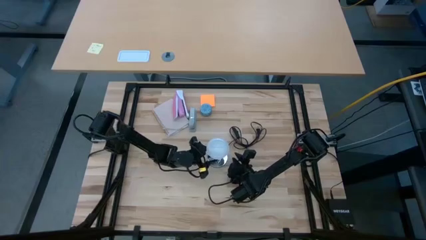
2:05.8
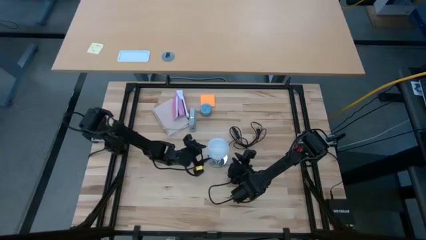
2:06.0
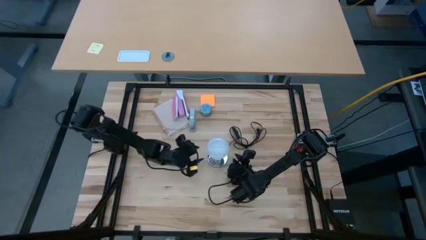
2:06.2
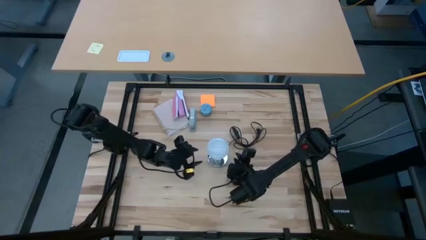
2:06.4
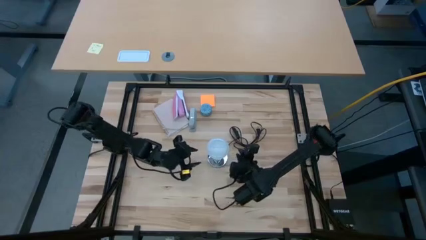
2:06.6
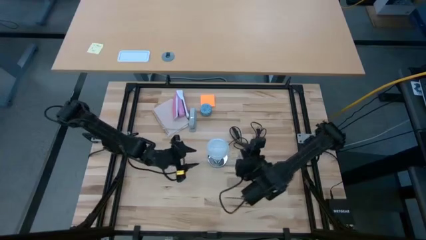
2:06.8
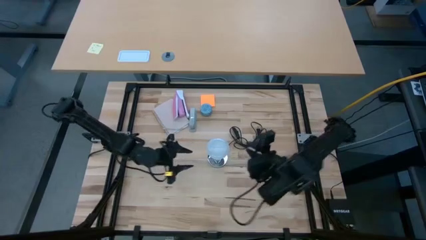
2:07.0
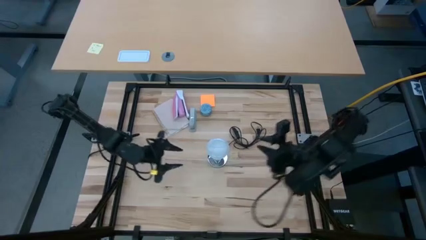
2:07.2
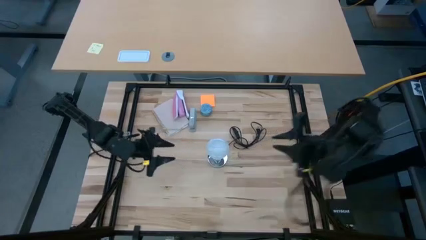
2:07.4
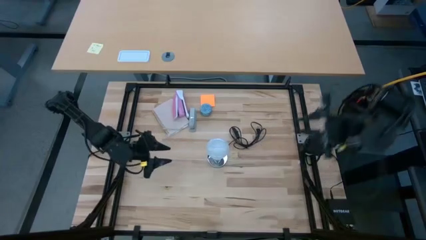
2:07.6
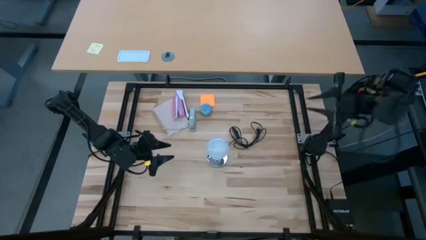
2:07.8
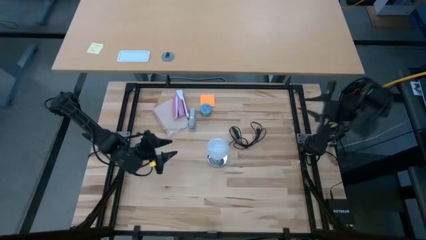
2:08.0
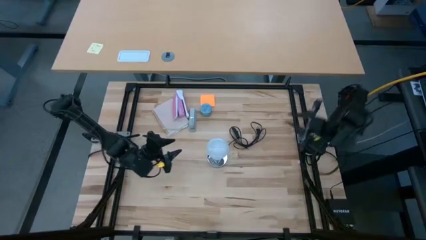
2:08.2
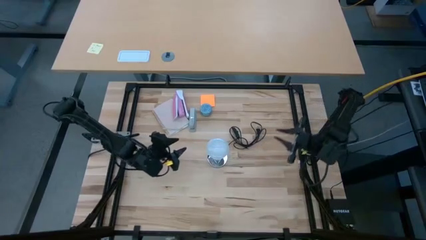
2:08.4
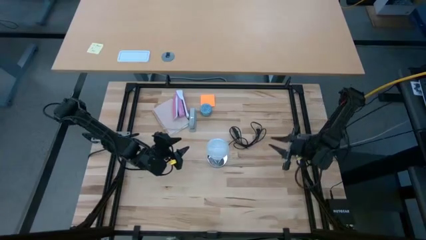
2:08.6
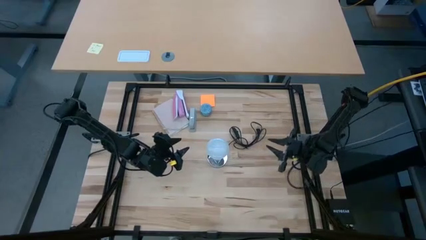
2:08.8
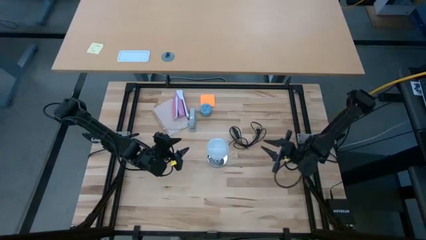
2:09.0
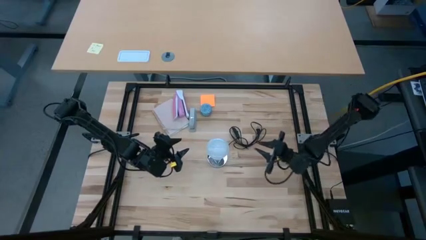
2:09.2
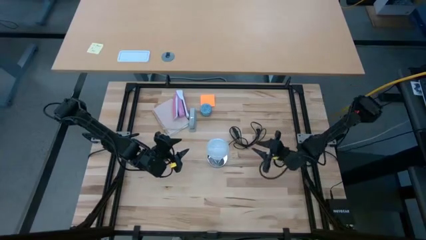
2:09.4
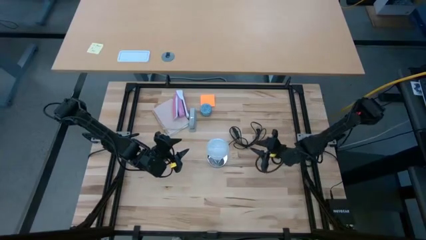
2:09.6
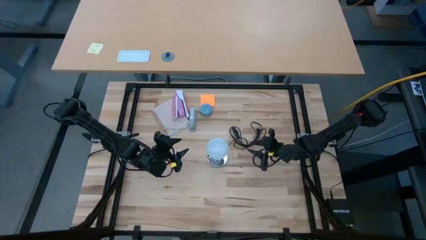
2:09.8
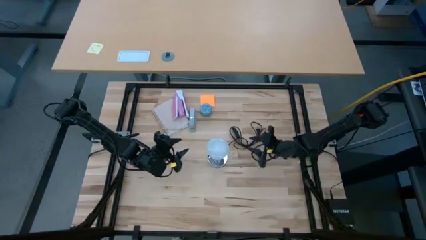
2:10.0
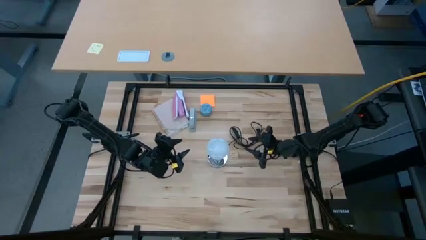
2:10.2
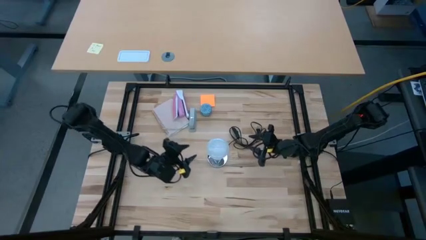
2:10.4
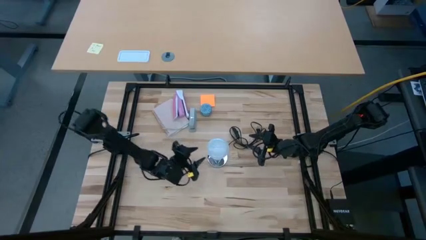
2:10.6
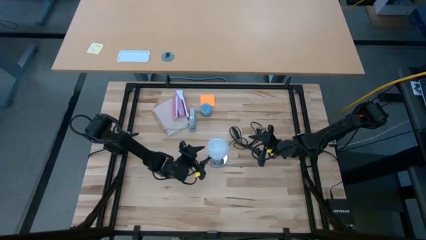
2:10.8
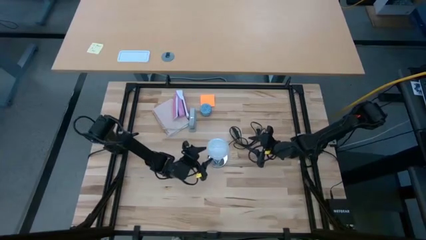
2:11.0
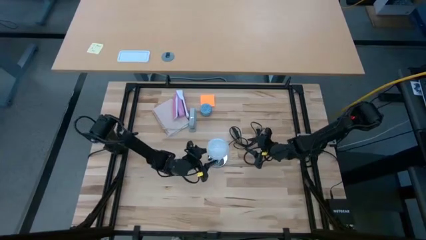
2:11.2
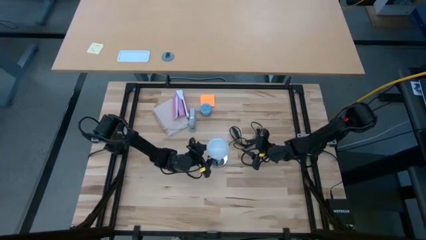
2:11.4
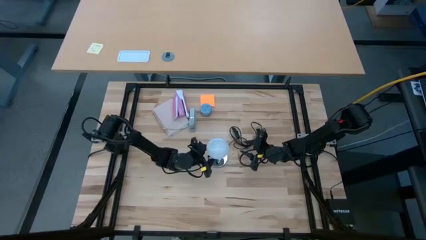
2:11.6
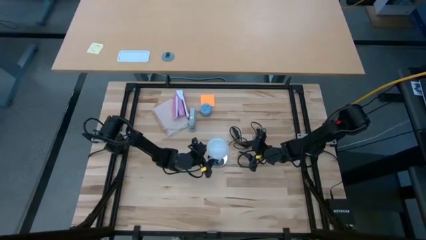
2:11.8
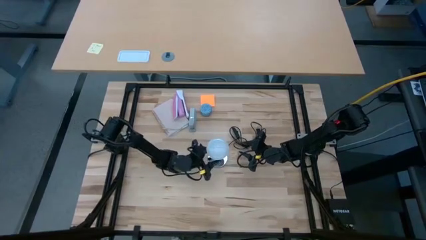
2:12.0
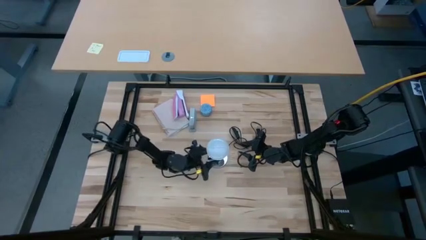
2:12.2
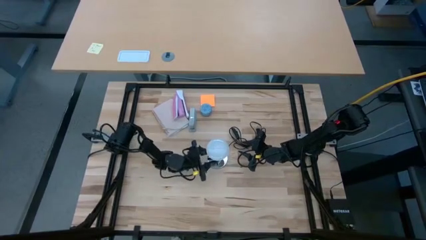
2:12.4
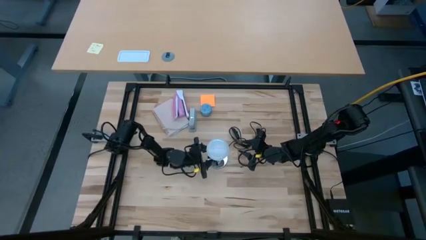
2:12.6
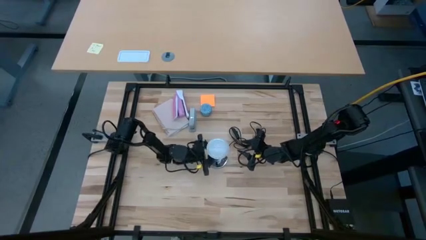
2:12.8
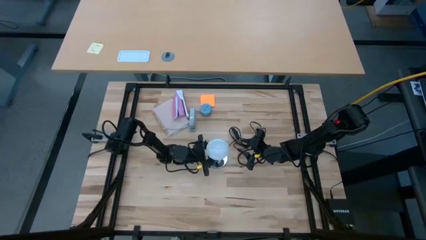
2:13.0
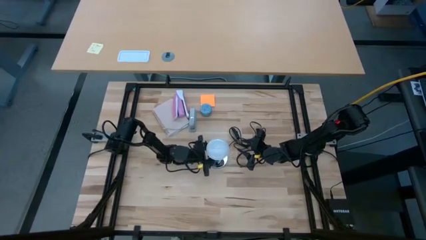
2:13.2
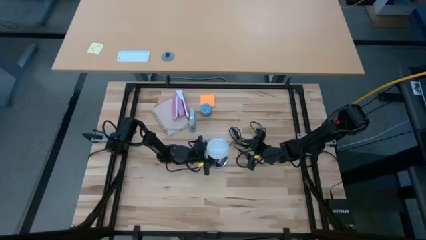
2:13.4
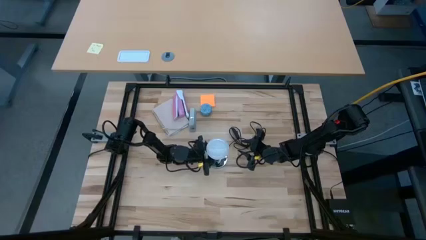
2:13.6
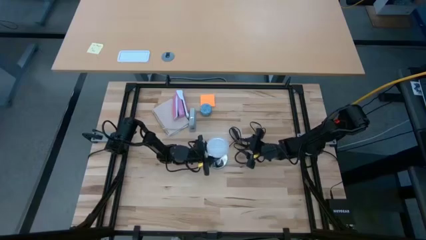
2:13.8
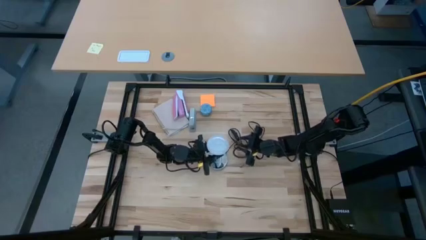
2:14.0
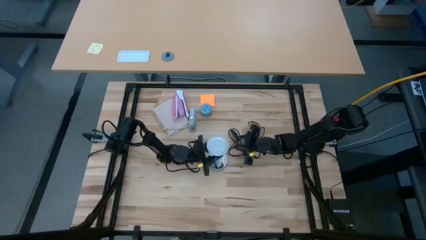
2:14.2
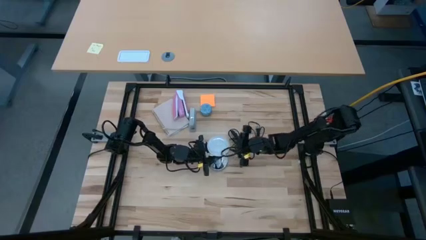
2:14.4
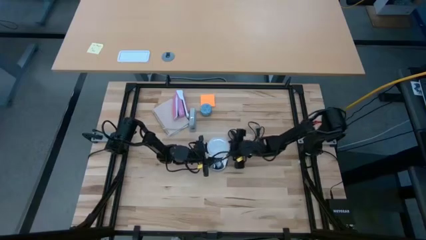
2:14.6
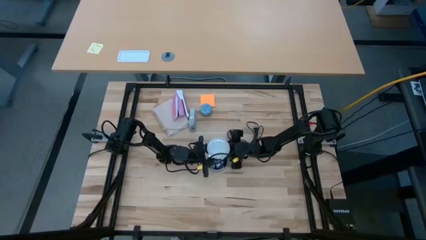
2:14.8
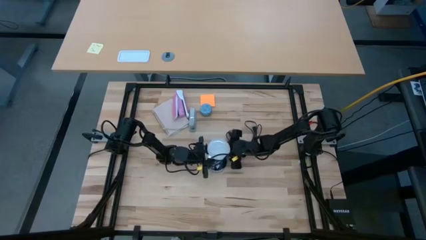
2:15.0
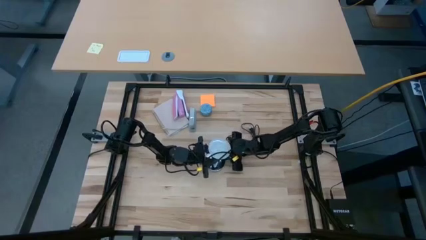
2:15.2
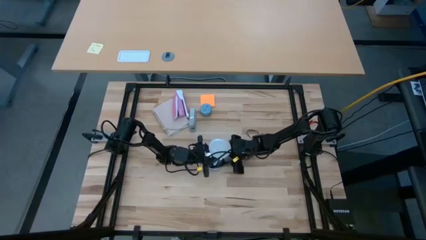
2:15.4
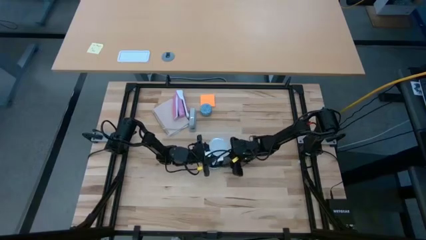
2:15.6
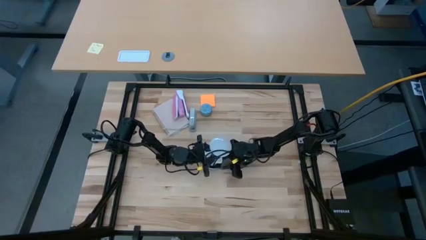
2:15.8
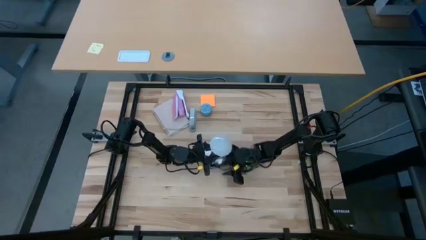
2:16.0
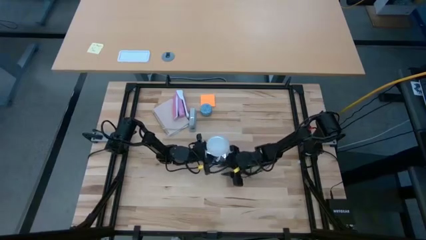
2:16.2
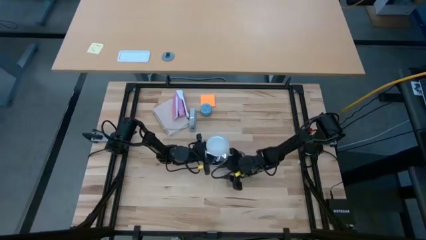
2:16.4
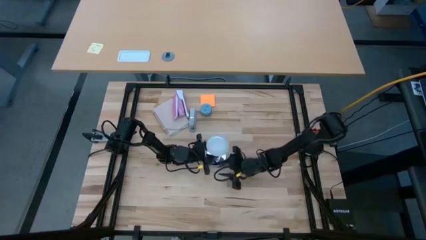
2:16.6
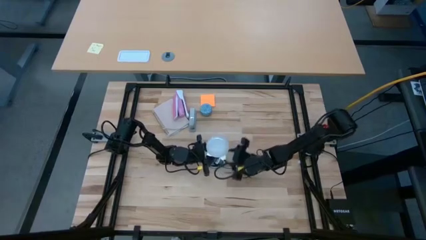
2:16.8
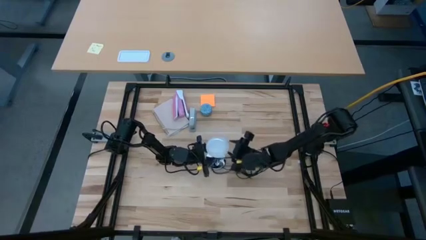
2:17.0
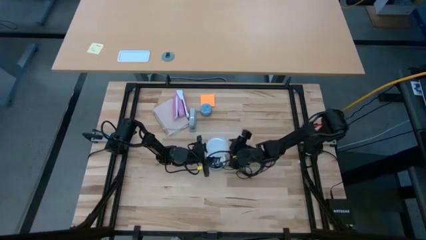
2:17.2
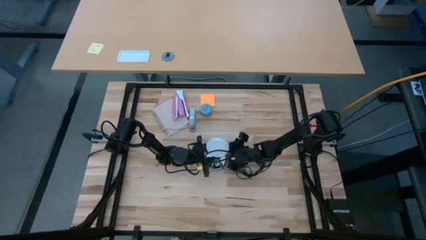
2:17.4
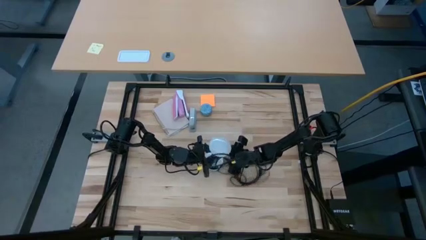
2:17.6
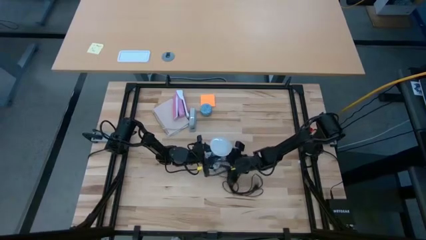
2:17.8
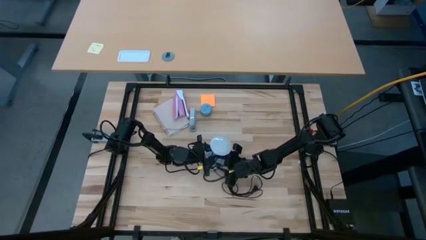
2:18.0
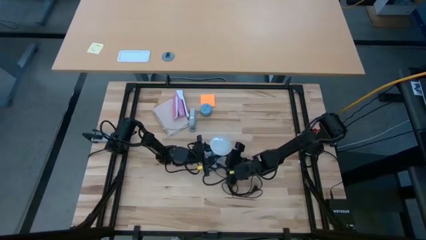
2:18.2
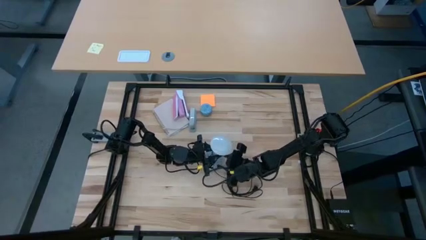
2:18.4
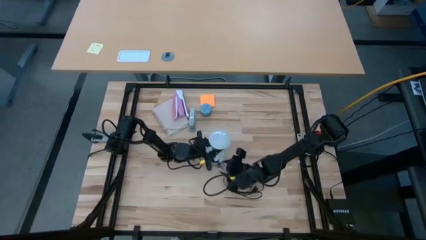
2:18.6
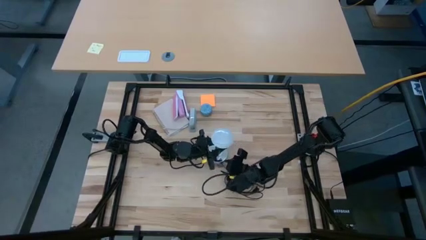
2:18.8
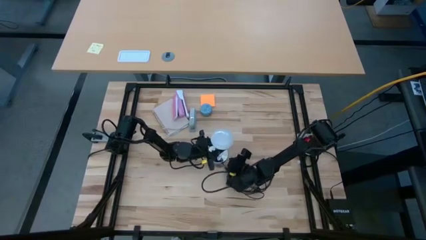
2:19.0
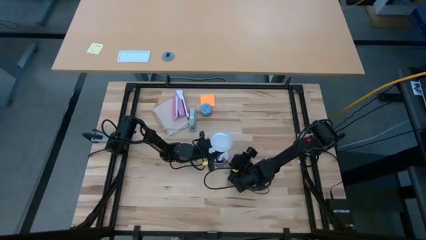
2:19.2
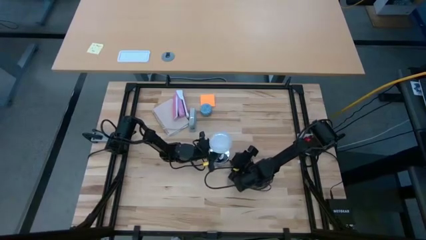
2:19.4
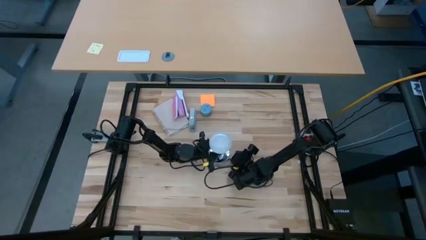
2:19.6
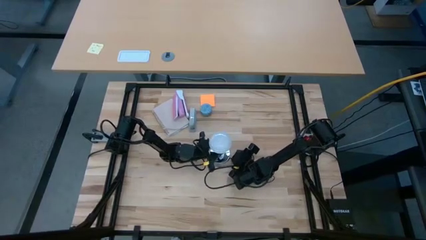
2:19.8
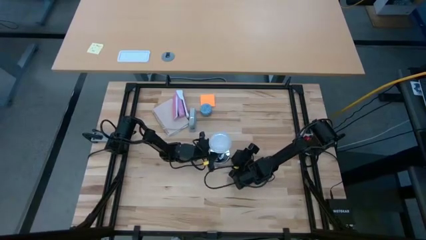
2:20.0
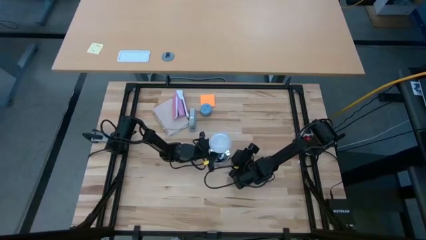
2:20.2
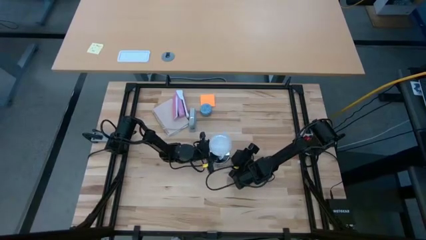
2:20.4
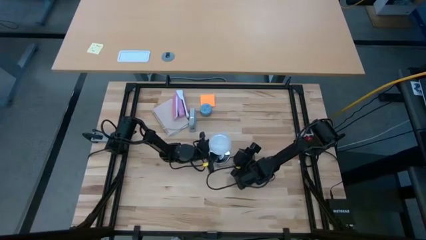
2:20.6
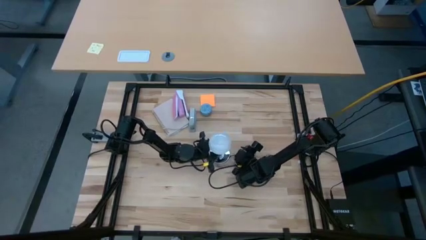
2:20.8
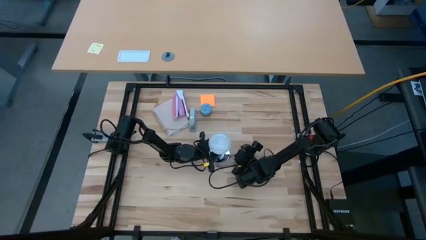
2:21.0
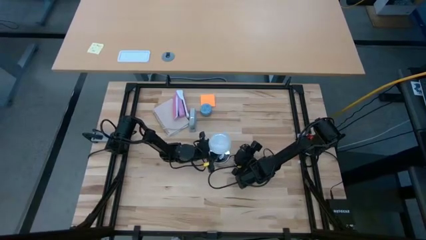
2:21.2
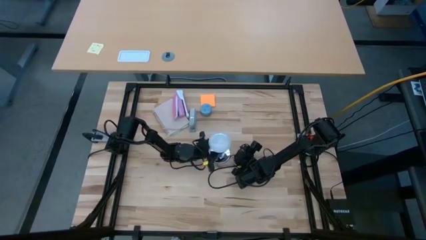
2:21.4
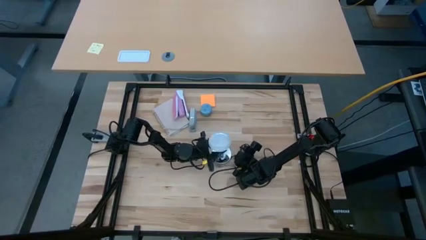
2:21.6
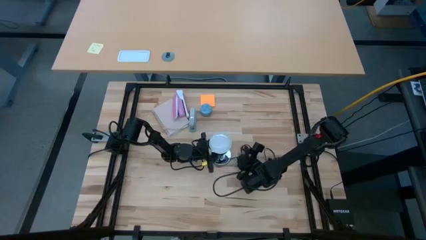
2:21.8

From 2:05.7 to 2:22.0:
Task: Screw lightbulb
Remove the white lightbulb from the silver lamp
